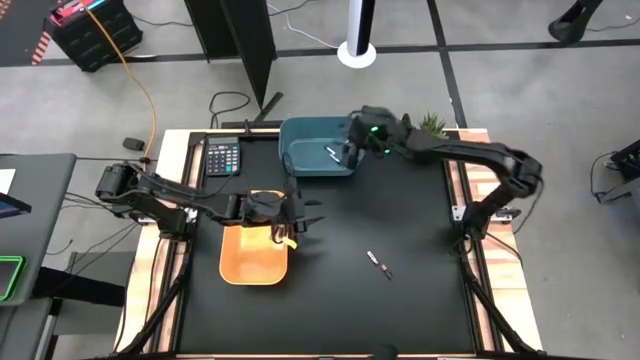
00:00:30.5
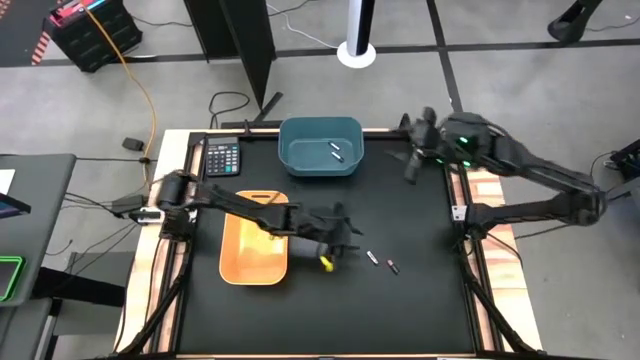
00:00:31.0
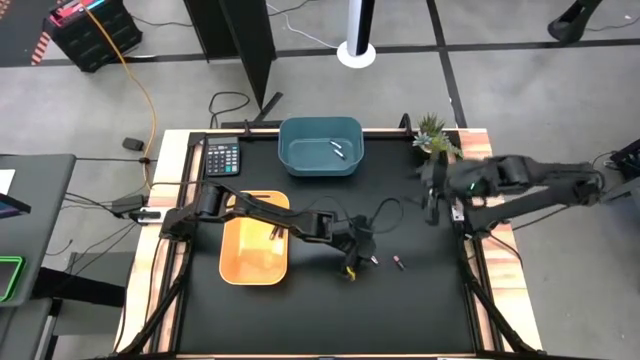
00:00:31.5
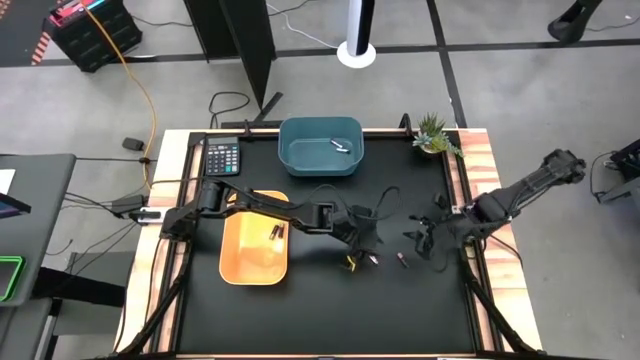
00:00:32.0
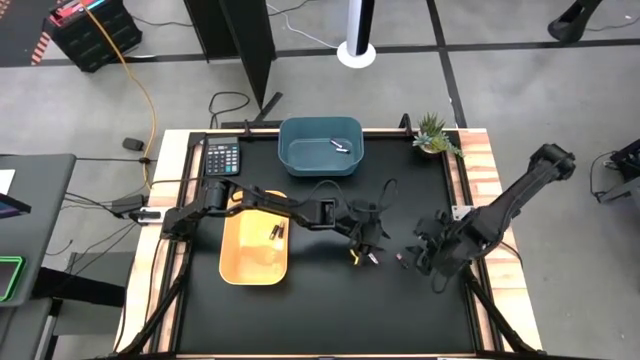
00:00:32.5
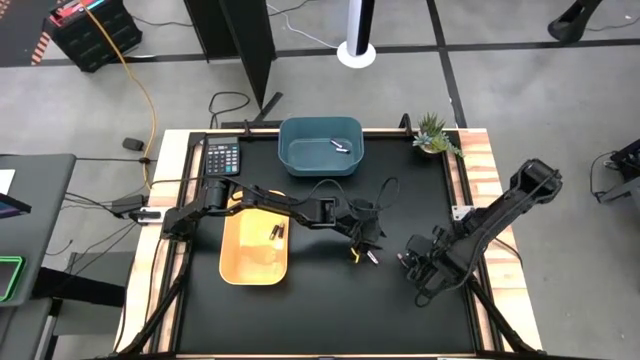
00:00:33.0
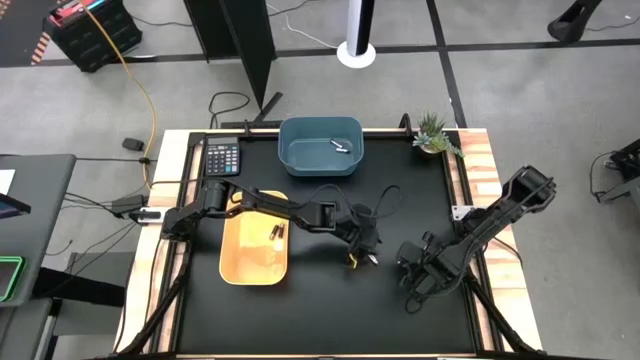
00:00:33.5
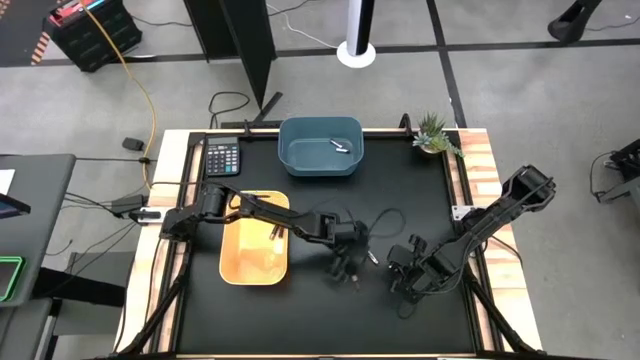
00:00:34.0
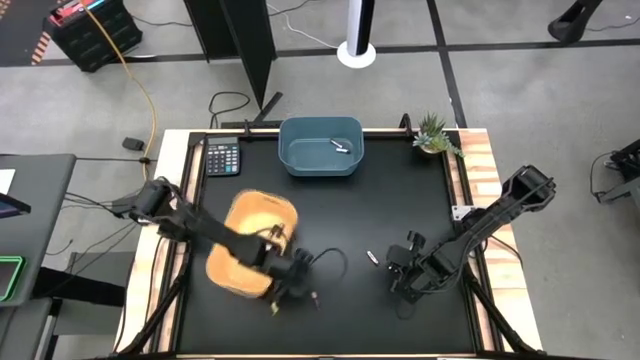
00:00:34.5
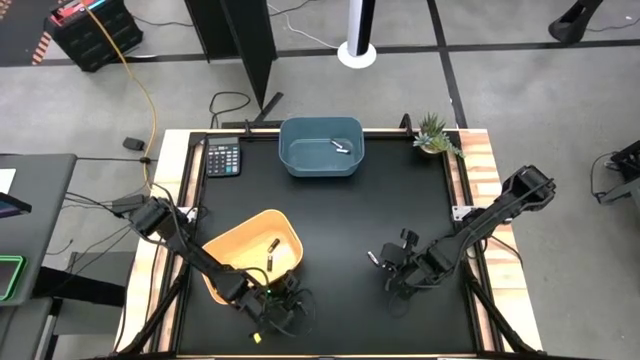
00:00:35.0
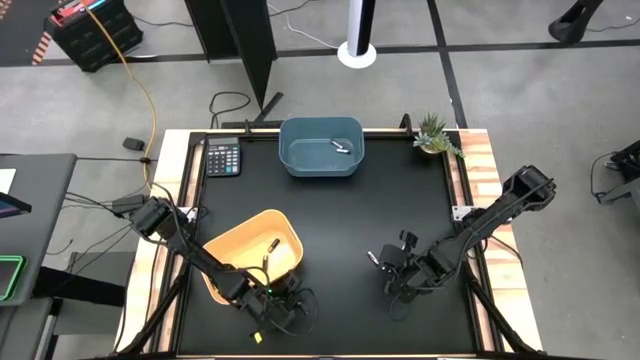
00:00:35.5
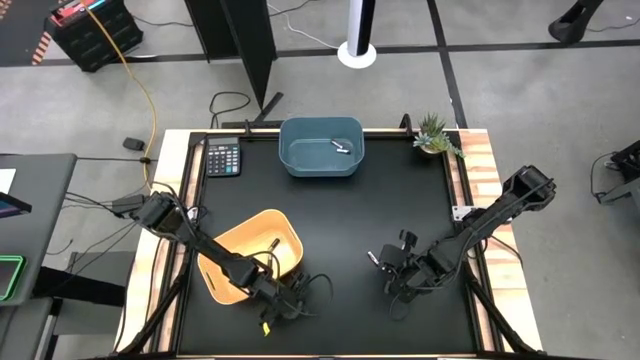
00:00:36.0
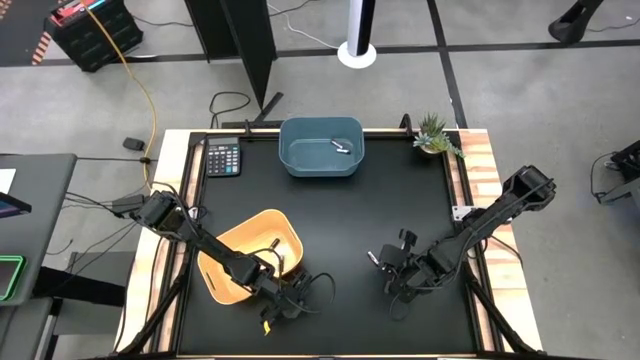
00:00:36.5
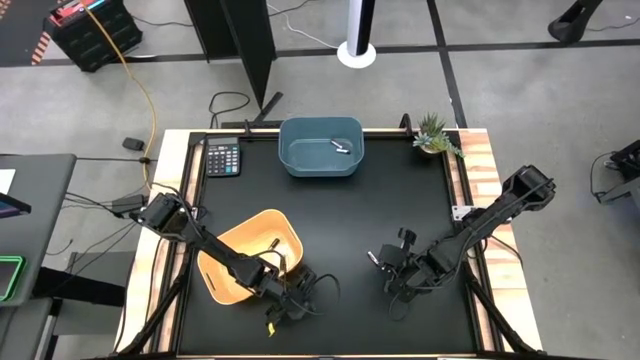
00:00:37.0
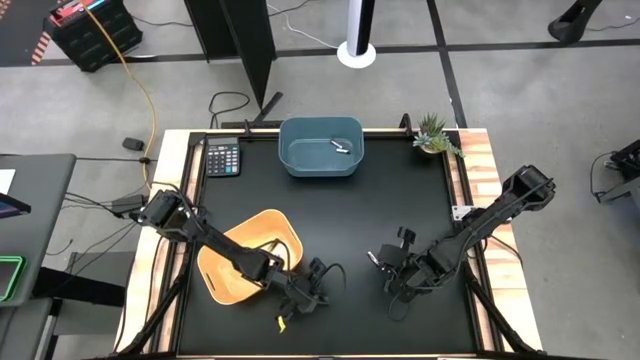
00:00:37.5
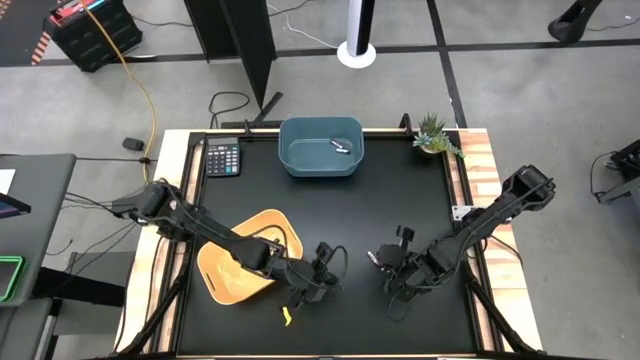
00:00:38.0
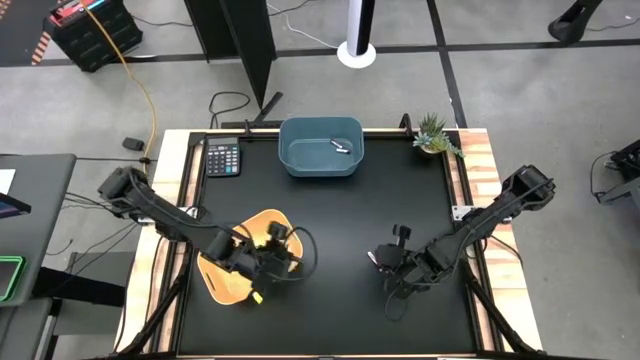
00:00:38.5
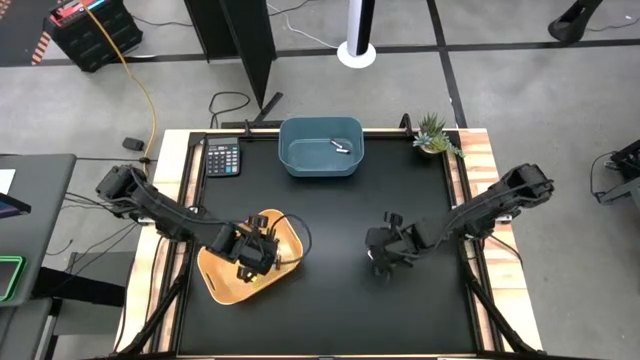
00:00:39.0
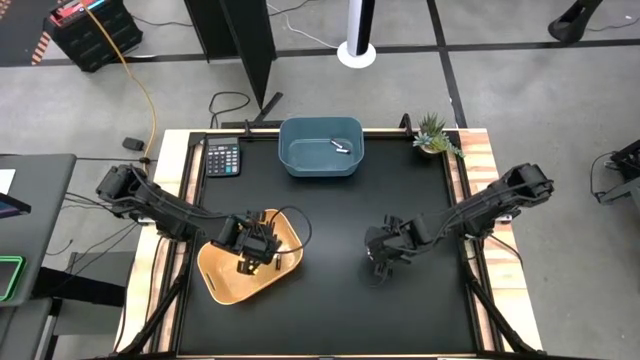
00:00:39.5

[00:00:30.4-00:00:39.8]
Task: Sort batteries
Put the black battery into the orange bin

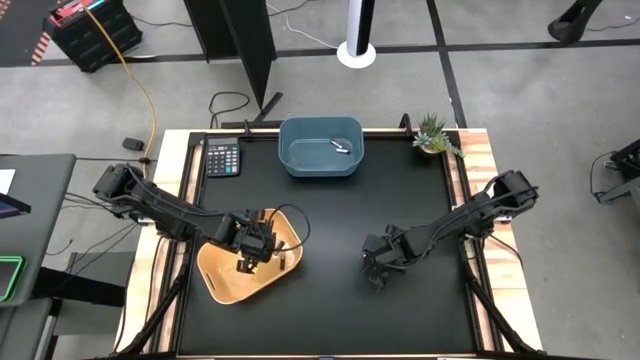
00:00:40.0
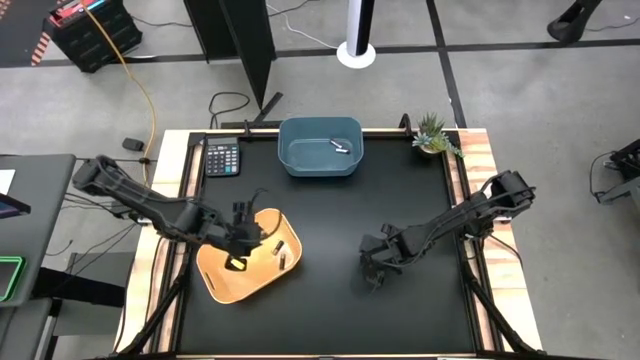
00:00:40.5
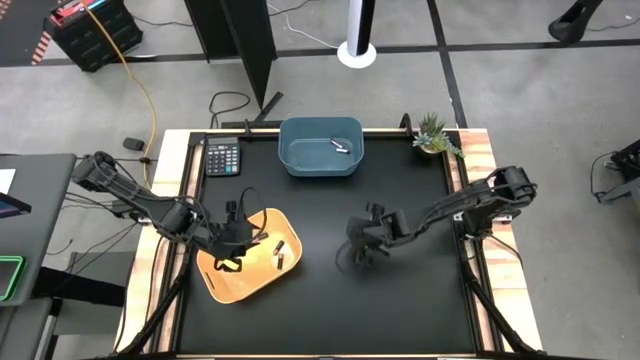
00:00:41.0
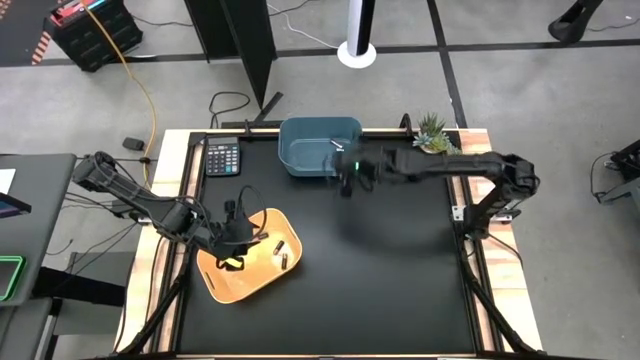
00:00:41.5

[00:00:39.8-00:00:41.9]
Put the silver battery into the blue bin

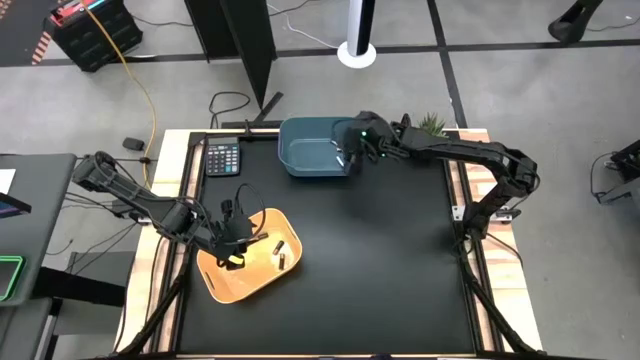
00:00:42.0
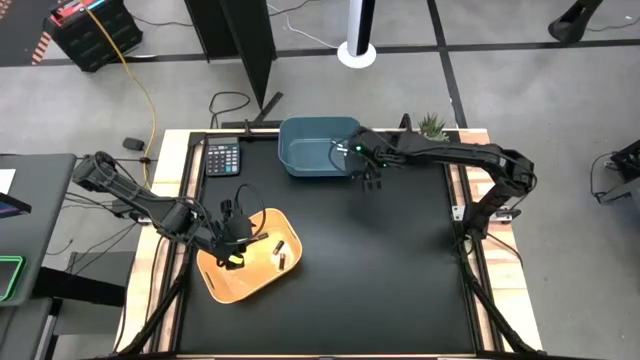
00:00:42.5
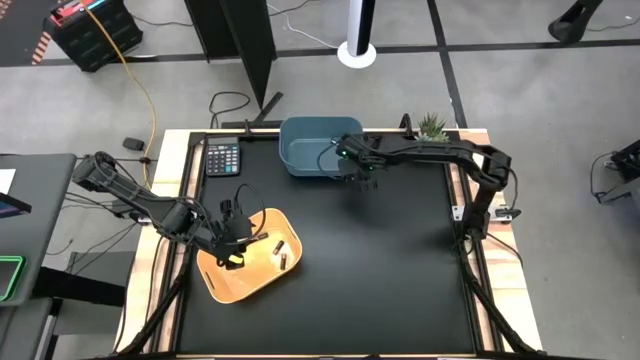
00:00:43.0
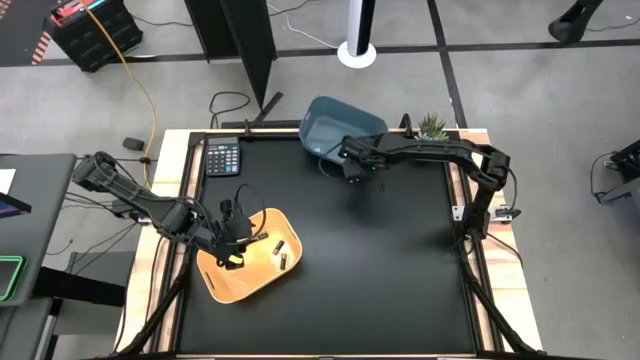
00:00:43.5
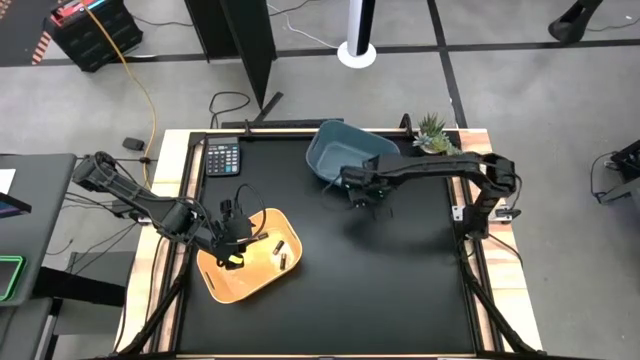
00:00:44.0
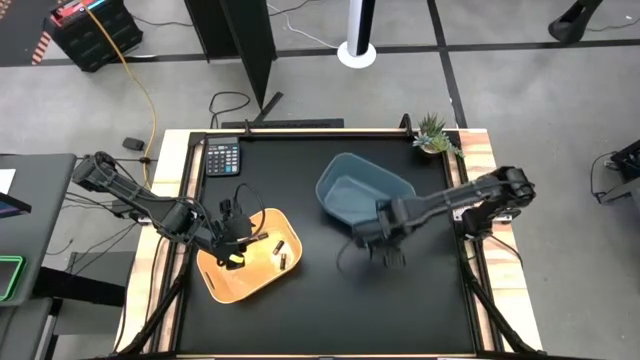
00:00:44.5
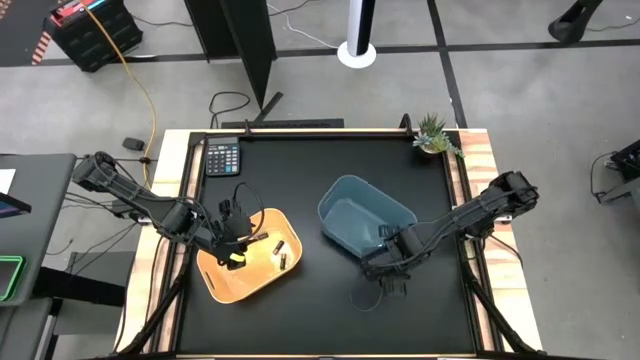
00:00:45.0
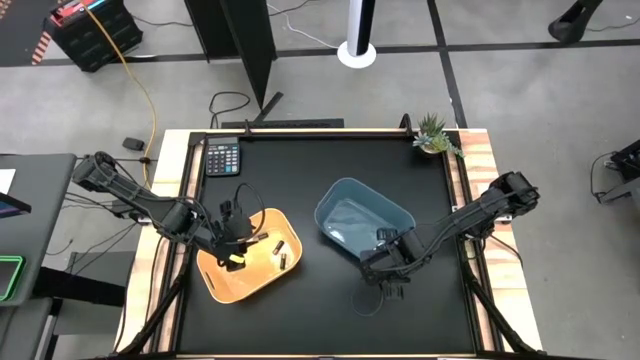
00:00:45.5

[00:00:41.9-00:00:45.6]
Move the blue bin to the center of the table

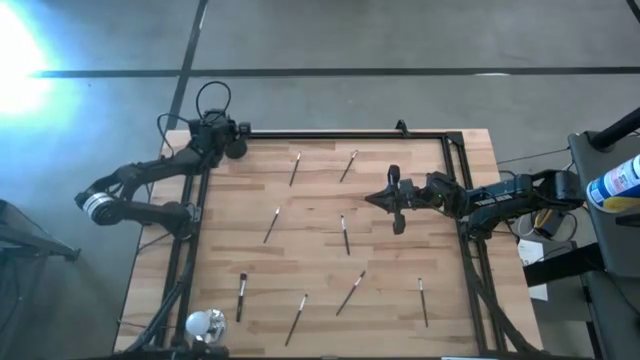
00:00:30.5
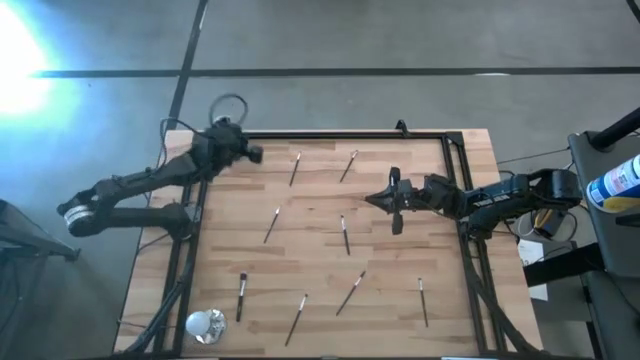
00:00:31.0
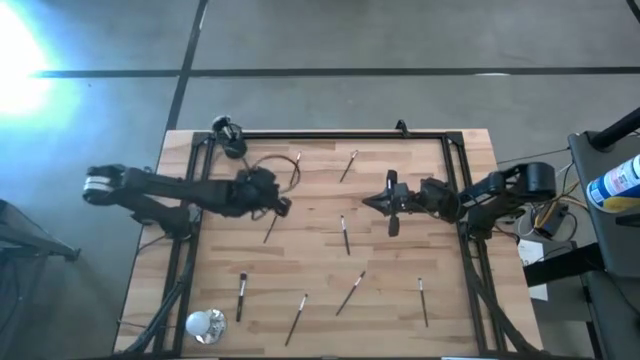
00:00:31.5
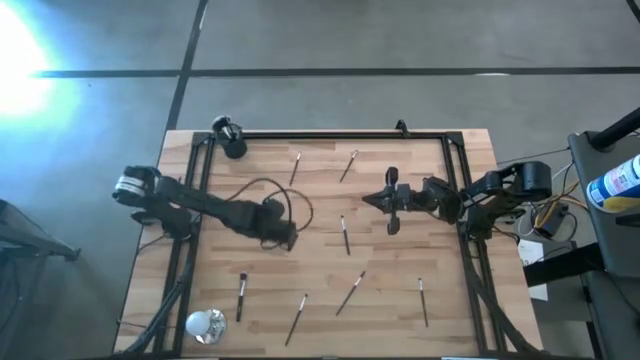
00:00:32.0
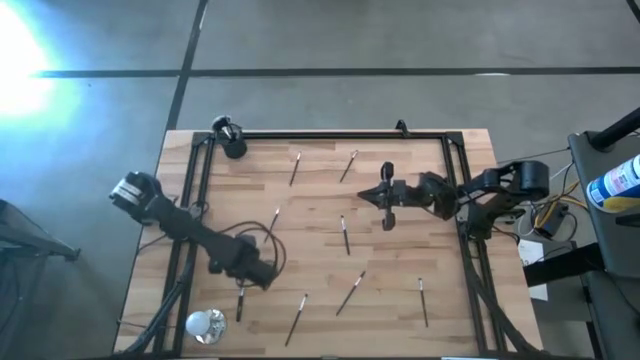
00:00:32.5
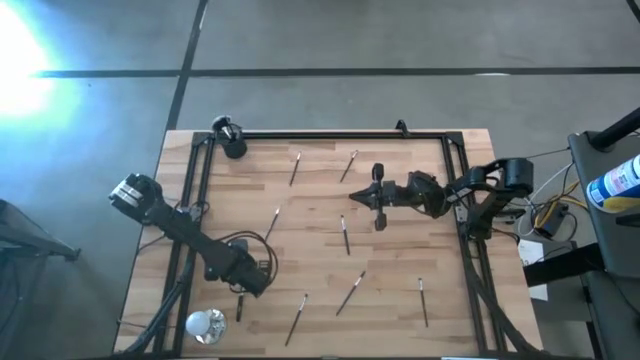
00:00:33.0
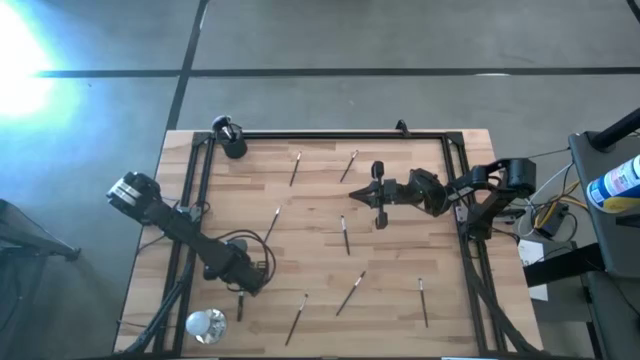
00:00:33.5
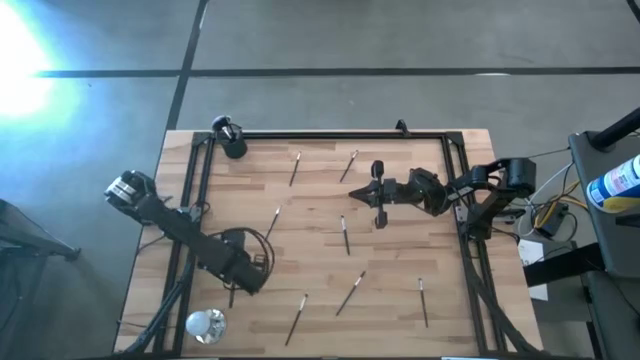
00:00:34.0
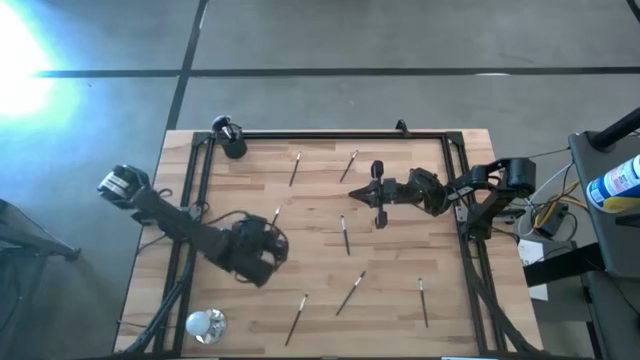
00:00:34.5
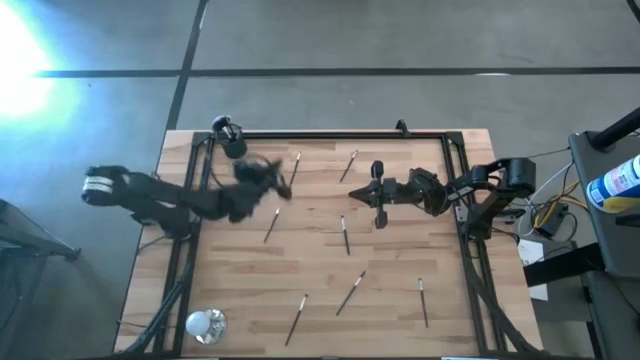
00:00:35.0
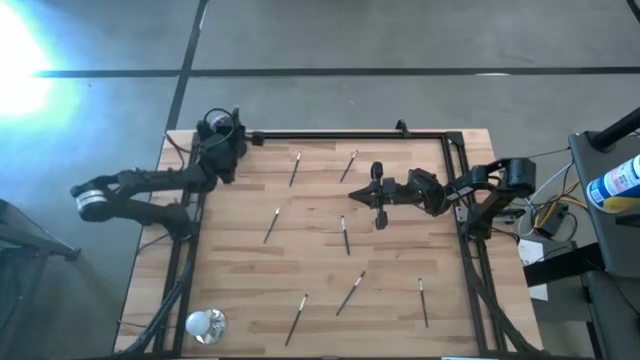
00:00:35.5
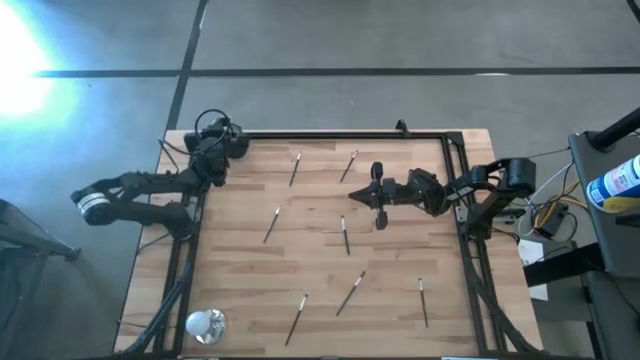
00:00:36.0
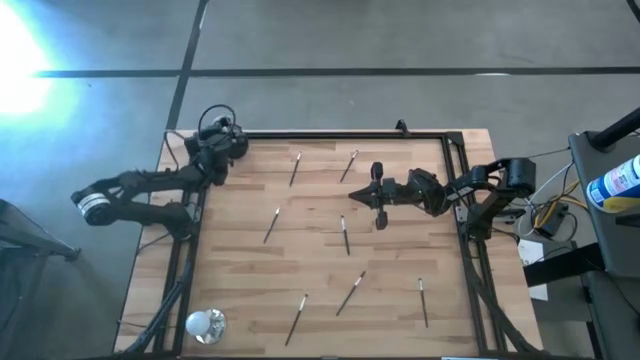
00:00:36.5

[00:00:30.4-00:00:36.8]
Task: Put items in baskets/containers
Put the black blush brush into the black pen holder
